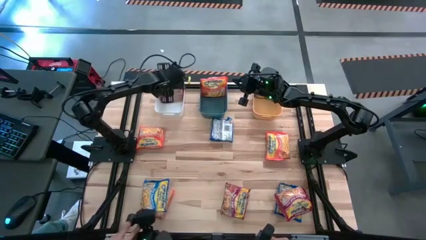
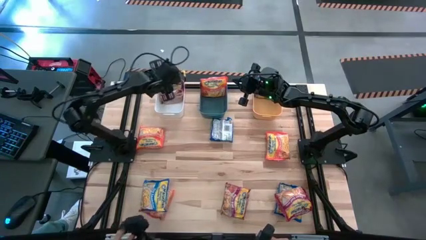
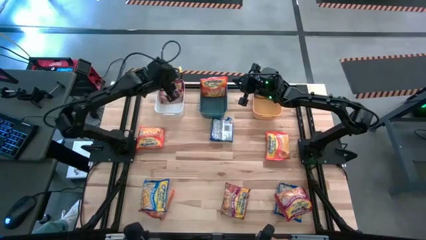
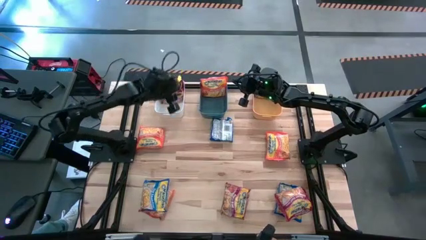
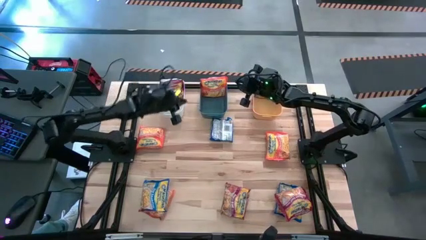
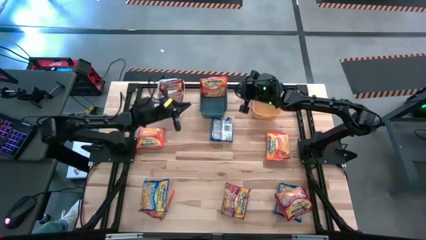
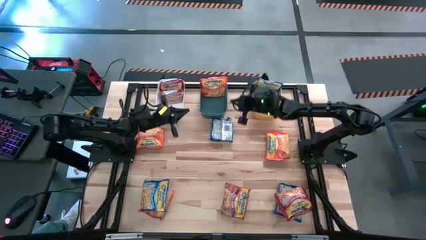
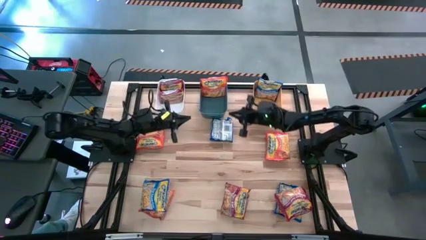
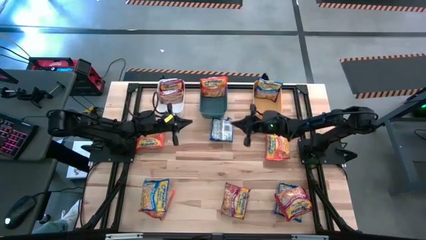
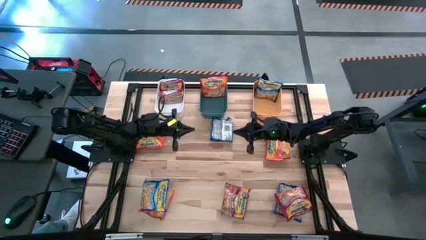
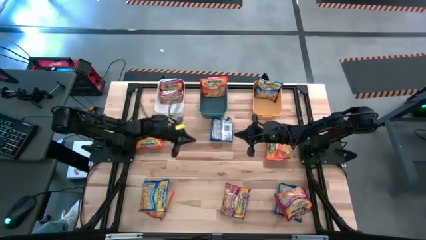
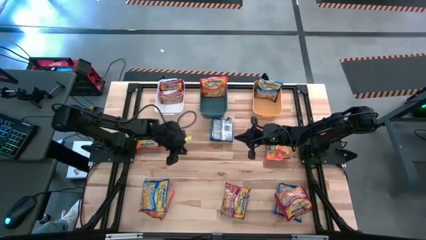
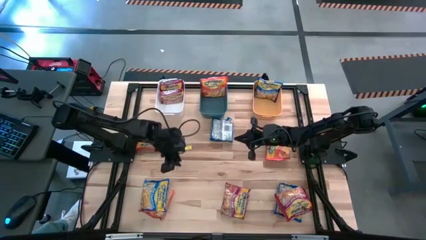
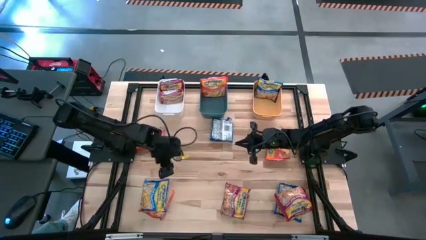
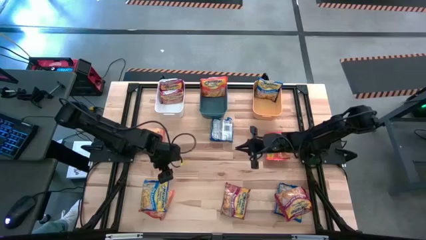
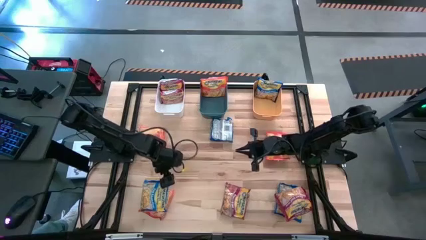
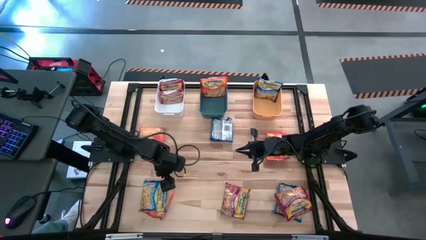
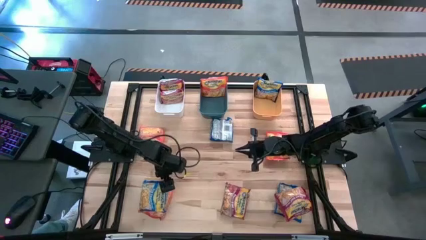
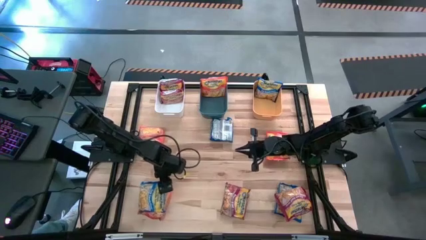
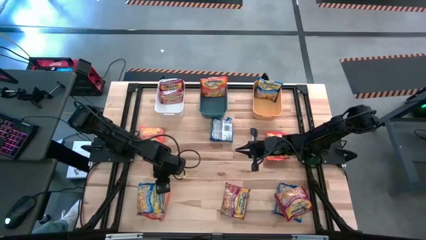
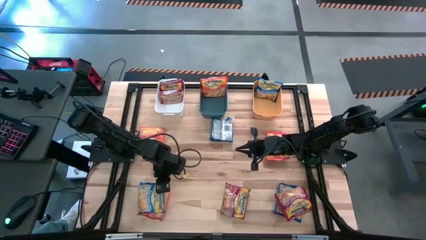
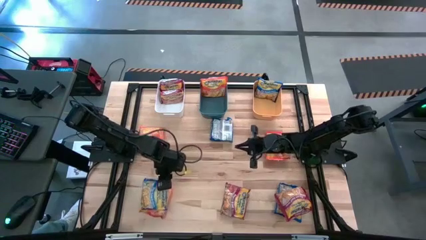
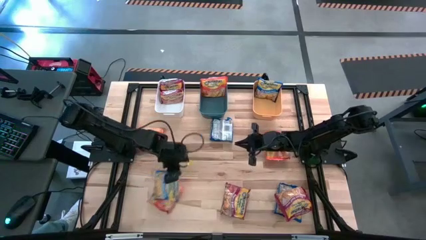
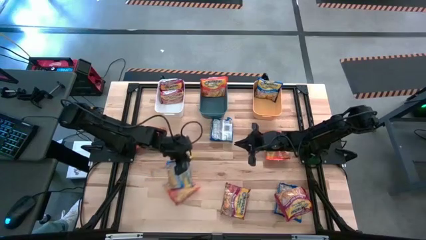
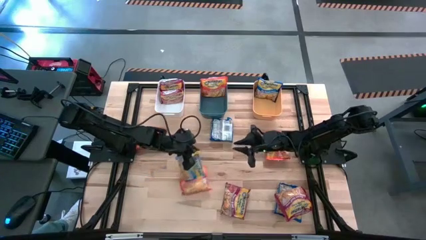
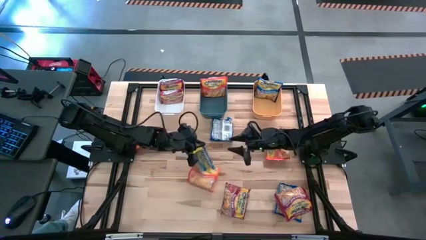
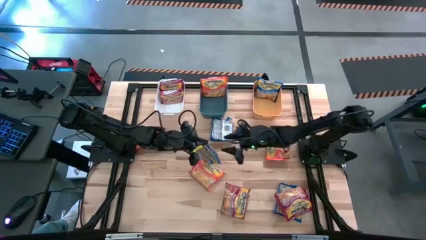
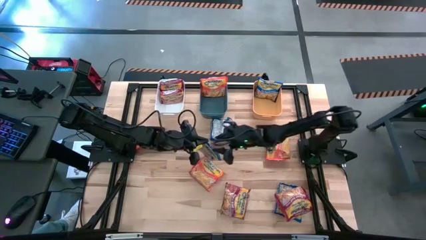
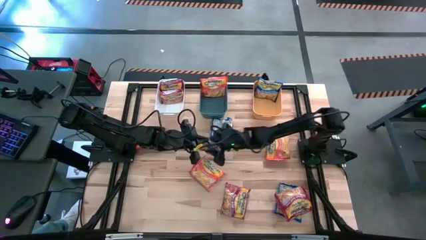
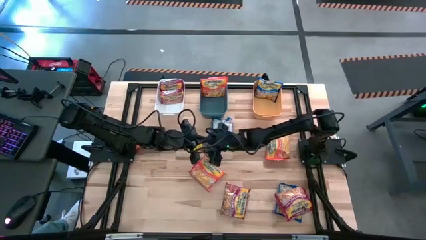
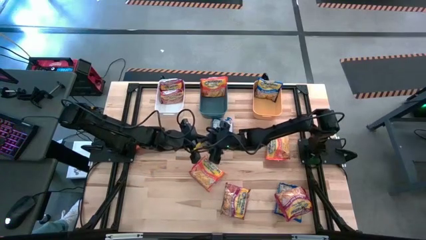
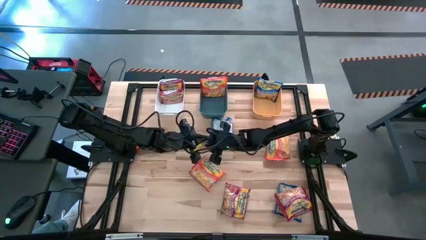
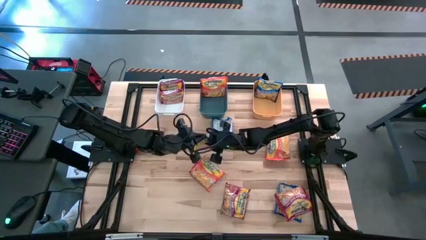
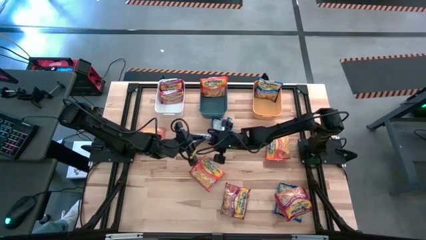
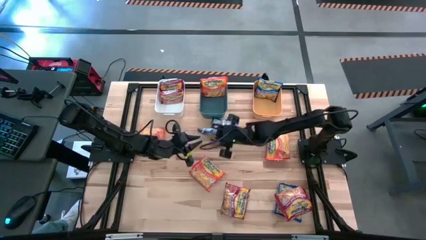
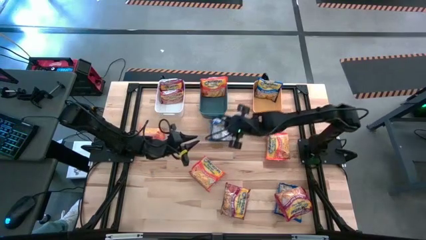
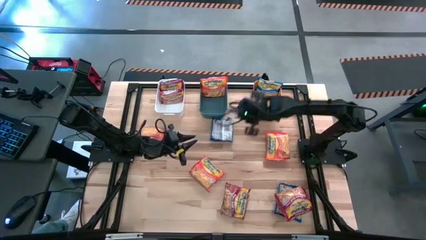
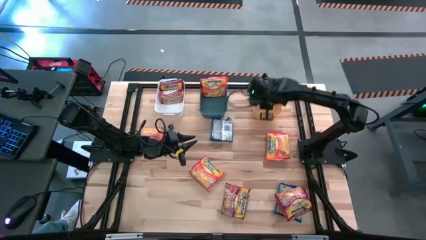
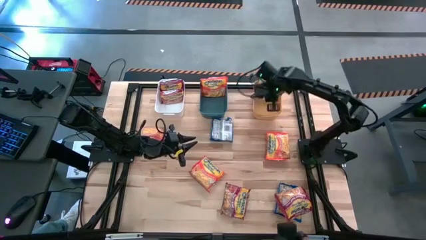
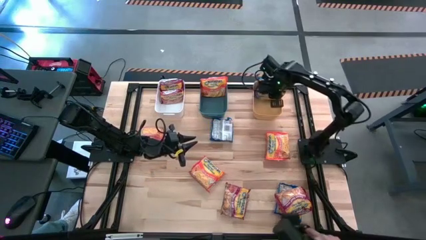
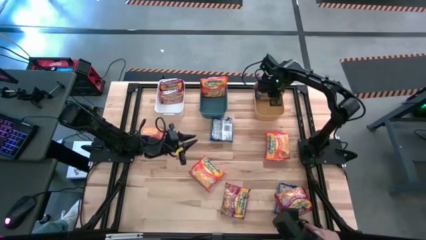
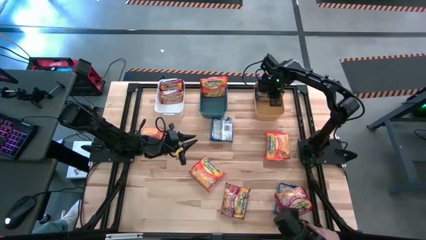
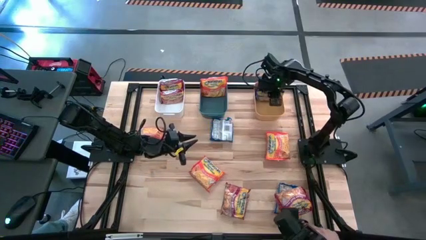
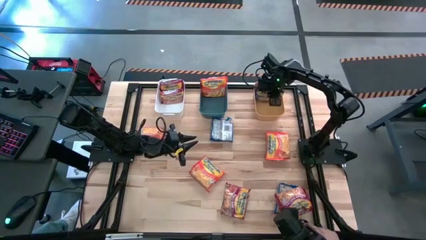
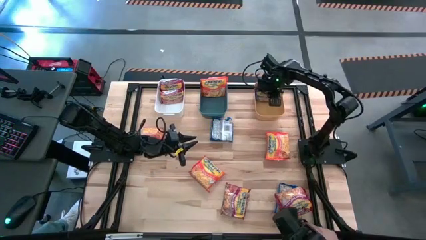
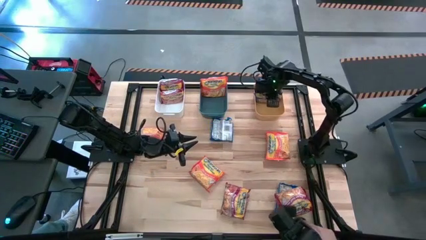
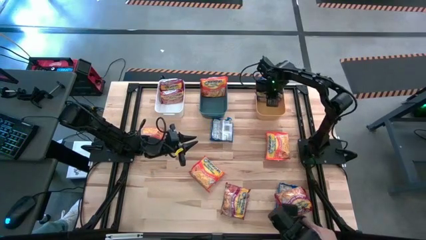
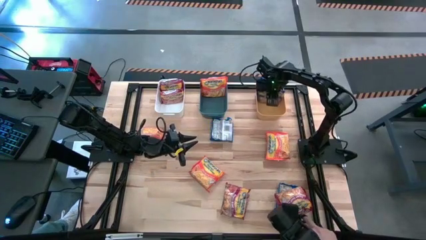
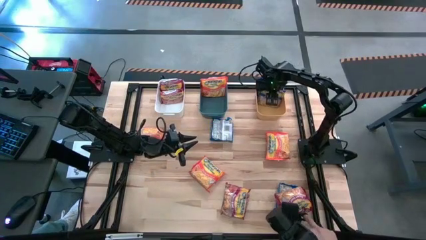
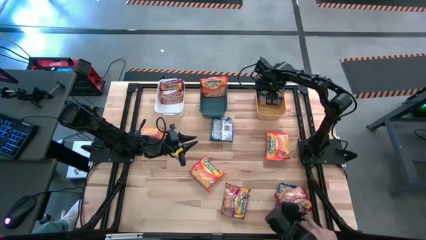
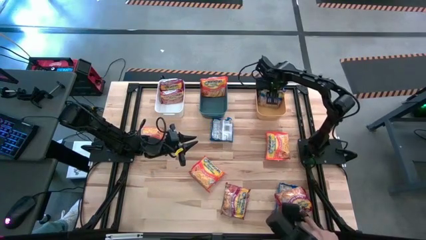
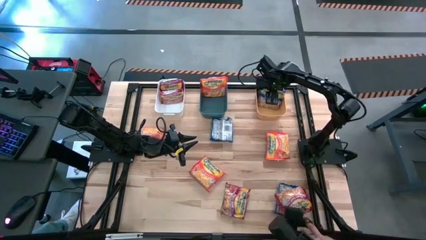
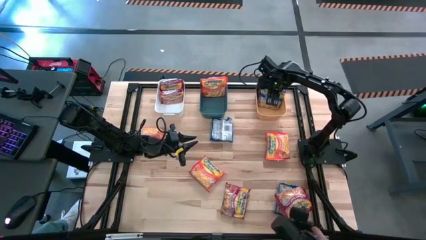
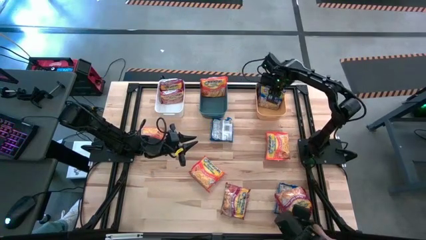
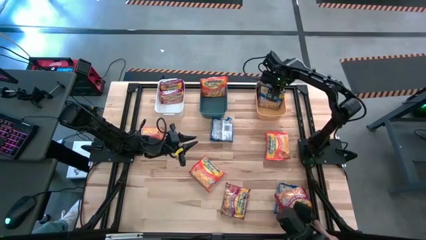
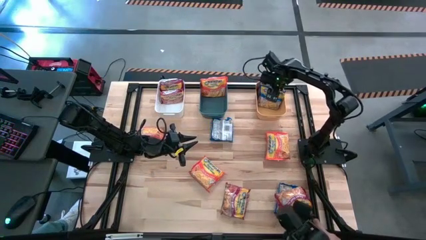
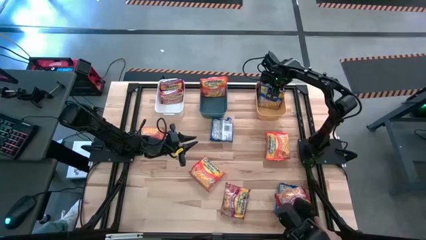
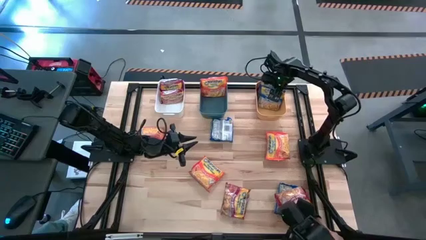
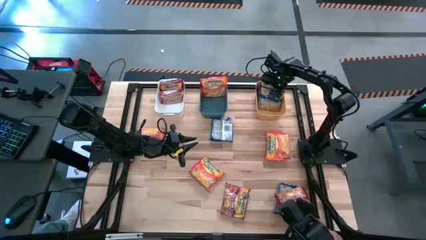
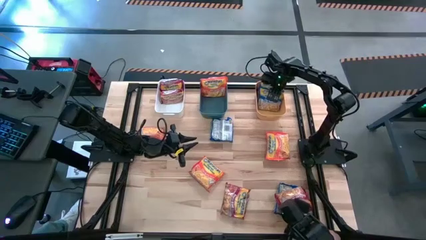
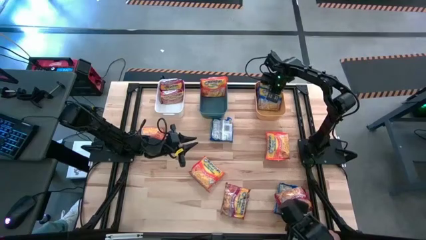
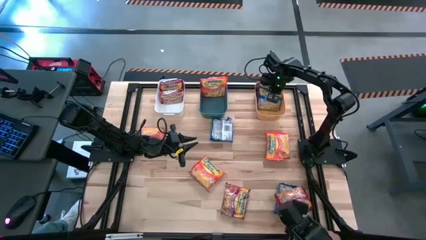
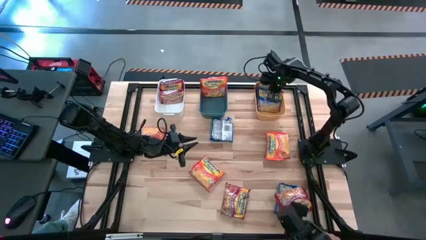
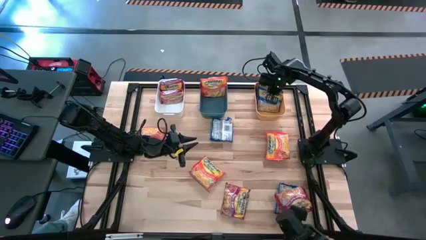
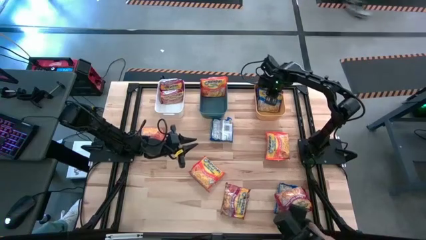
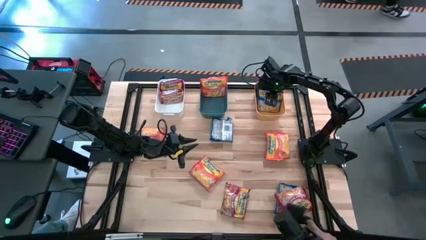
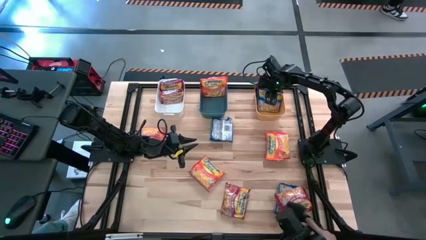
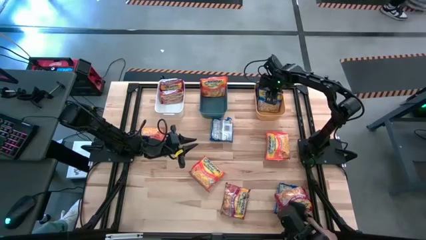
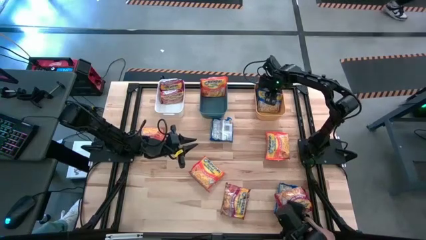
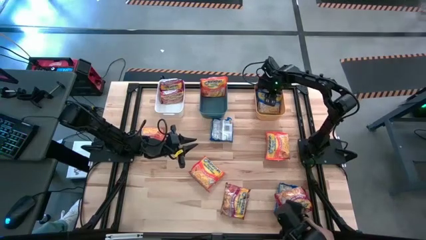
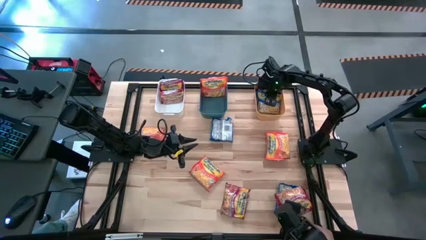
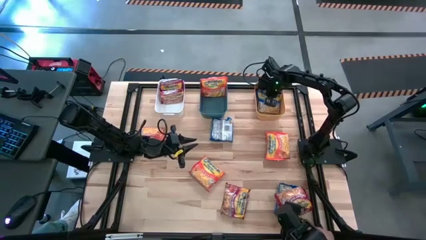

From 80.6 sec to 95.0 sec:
Task: Sort Maruchan noodles
Put the blue noodle pack into the yellow bin

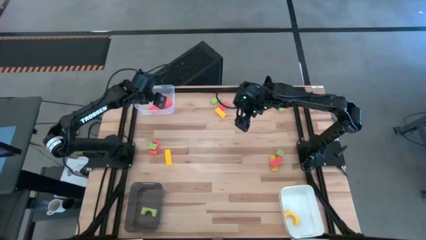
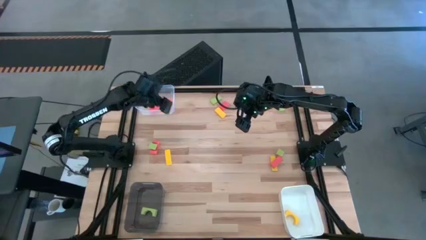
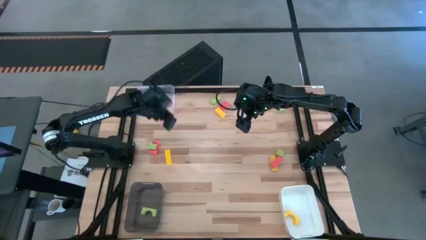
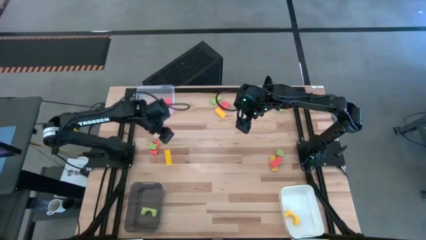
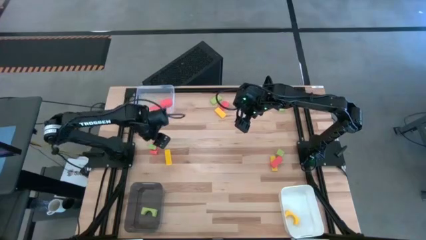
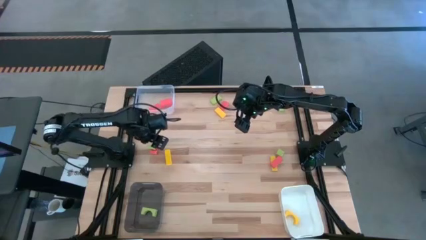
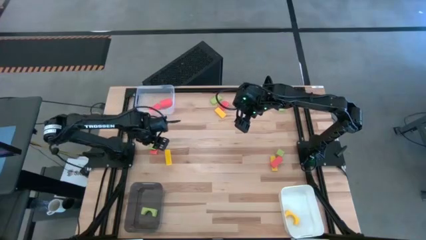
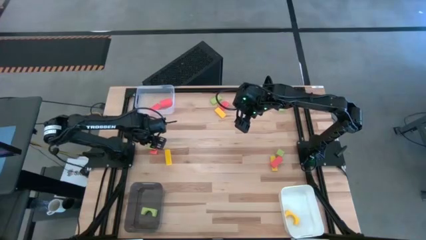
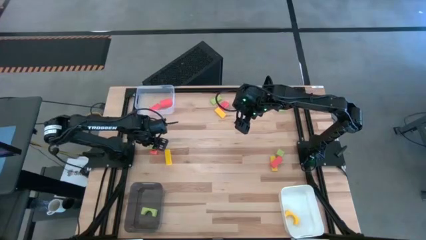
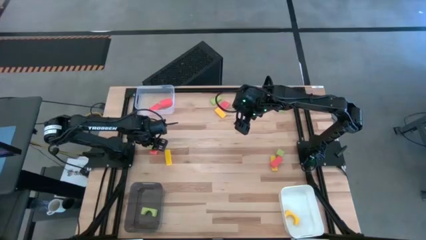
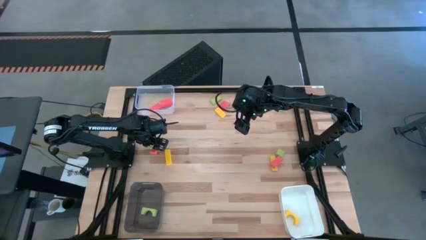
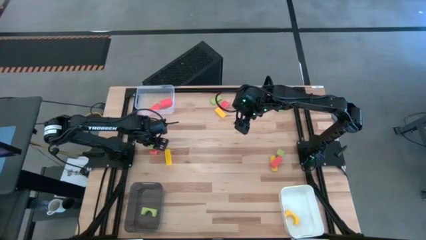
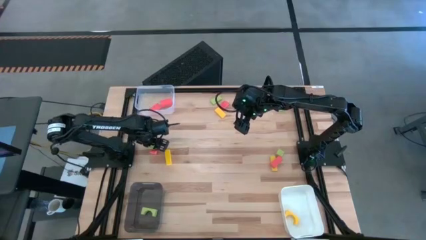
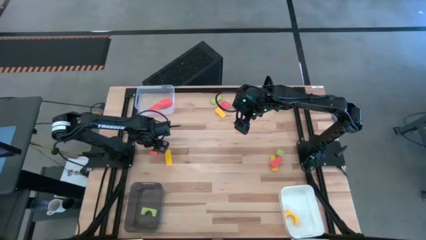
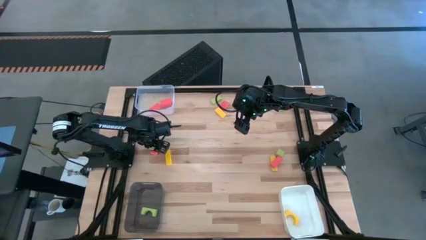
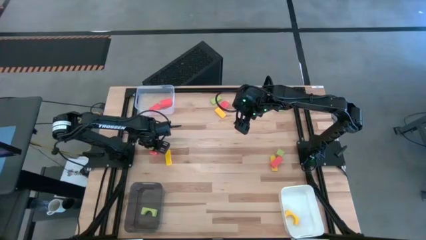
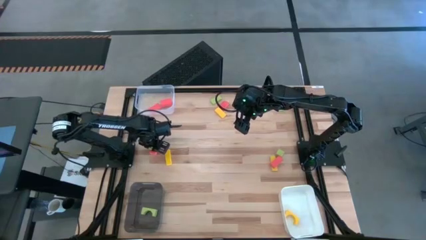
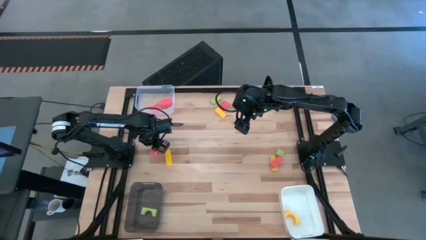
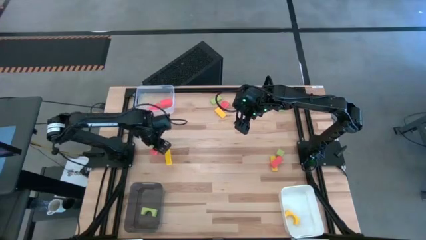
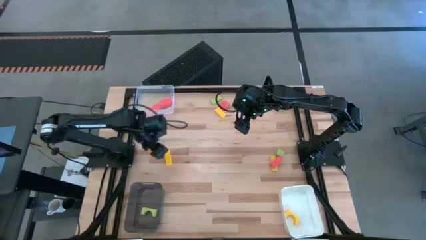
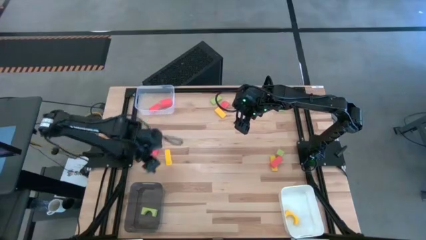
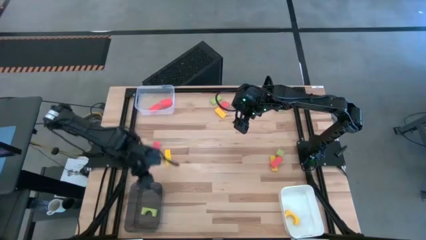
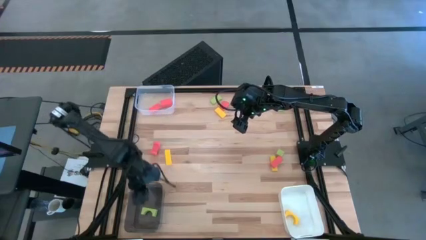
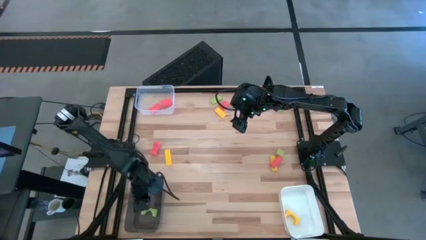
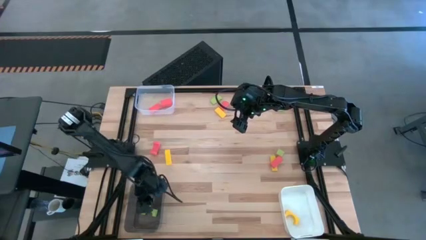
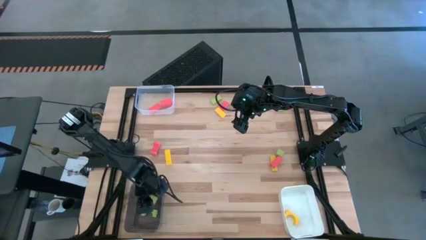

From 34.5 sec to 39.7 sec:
Task: Sort & place blocks by color
Put the green block into the black transparent bin
